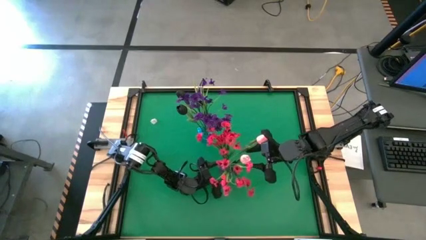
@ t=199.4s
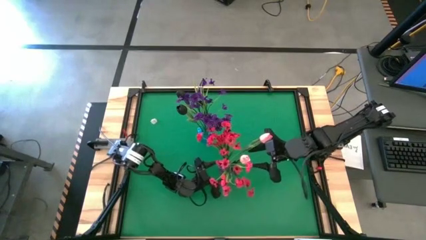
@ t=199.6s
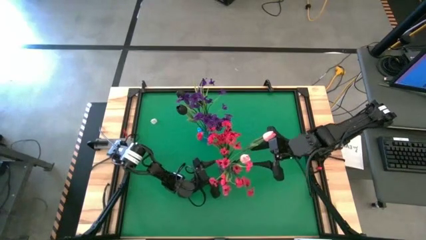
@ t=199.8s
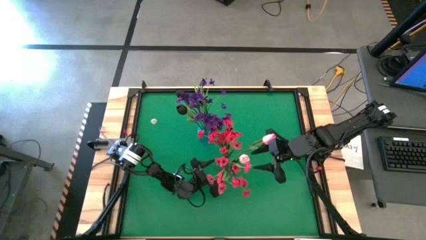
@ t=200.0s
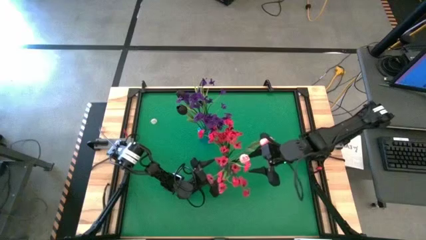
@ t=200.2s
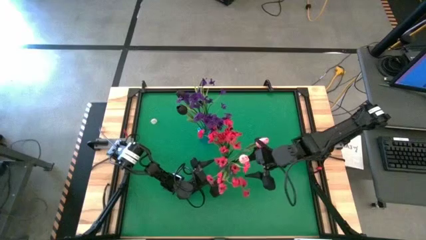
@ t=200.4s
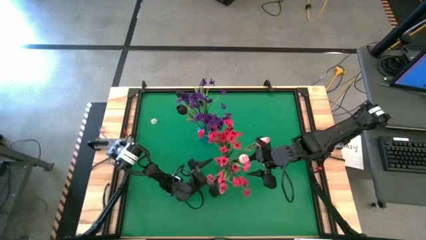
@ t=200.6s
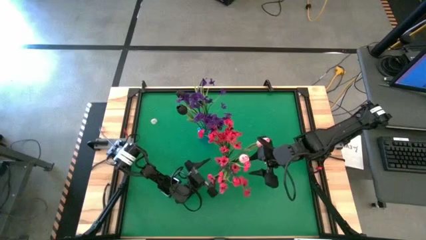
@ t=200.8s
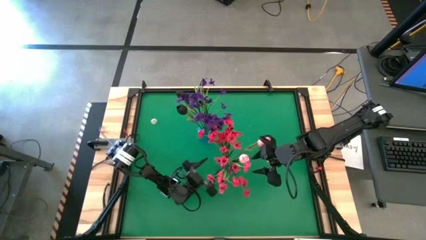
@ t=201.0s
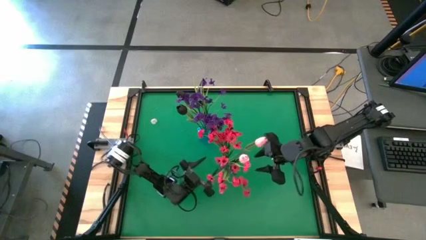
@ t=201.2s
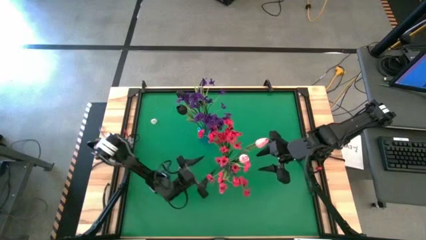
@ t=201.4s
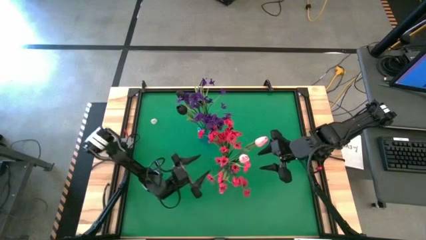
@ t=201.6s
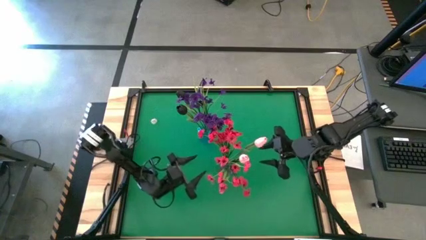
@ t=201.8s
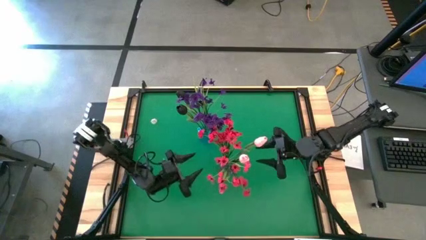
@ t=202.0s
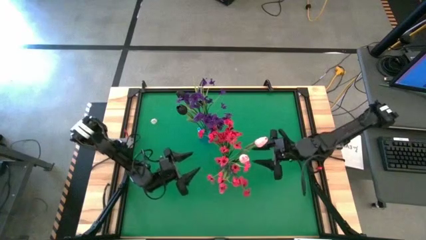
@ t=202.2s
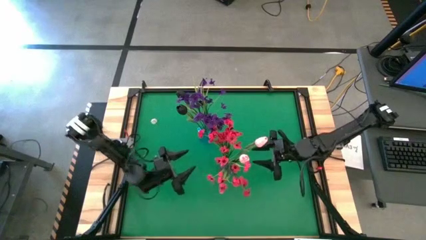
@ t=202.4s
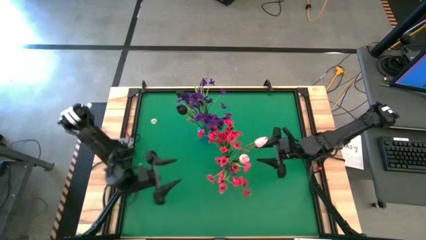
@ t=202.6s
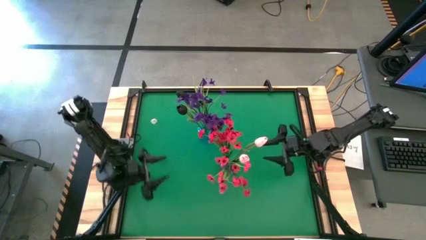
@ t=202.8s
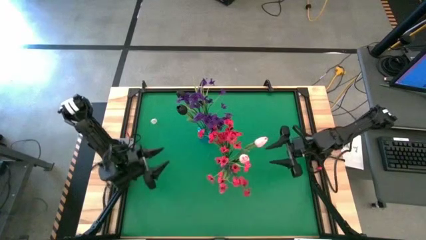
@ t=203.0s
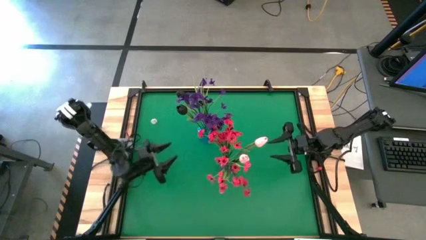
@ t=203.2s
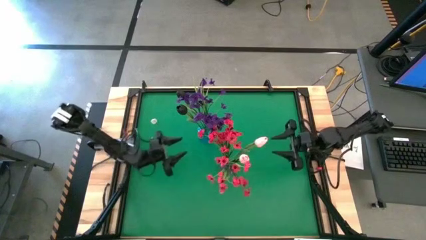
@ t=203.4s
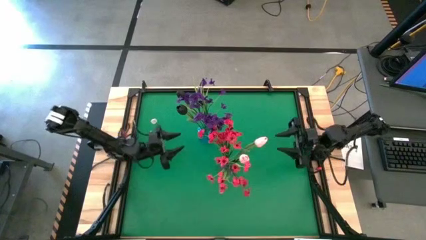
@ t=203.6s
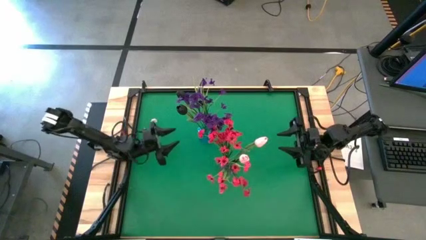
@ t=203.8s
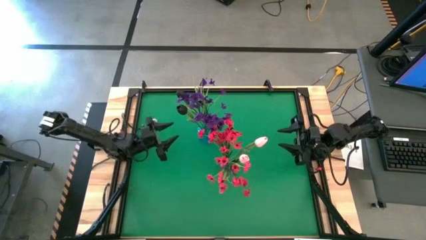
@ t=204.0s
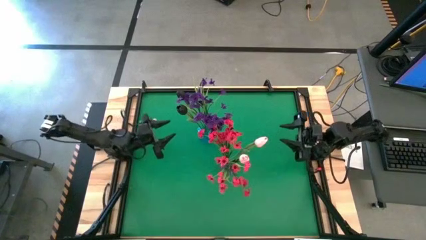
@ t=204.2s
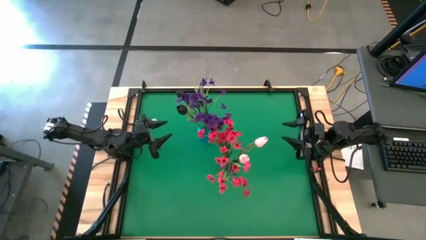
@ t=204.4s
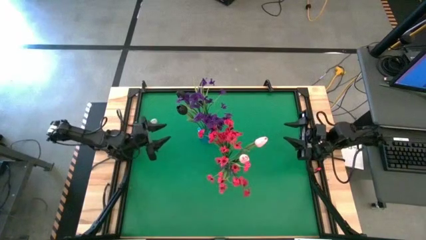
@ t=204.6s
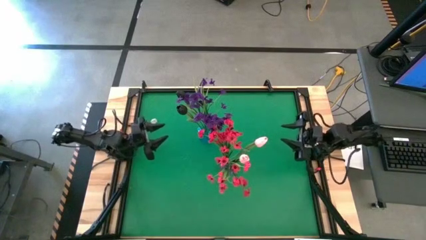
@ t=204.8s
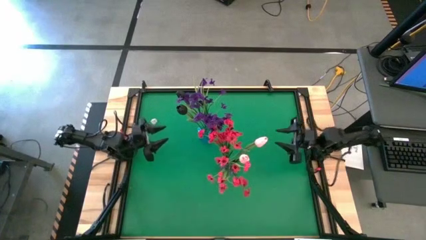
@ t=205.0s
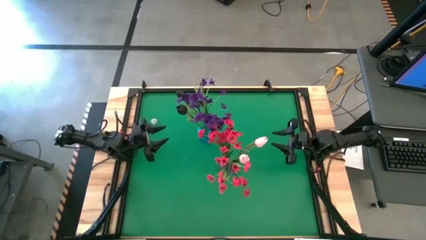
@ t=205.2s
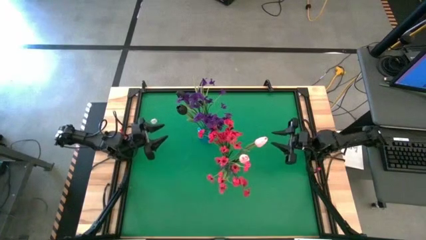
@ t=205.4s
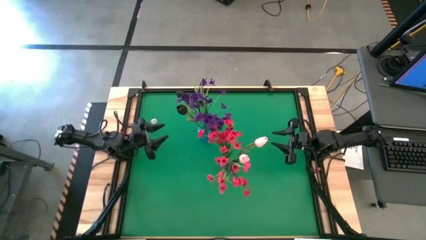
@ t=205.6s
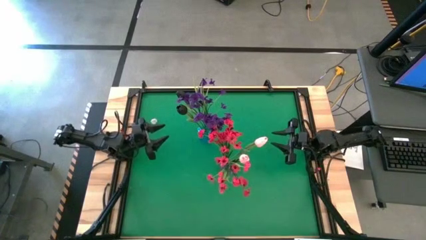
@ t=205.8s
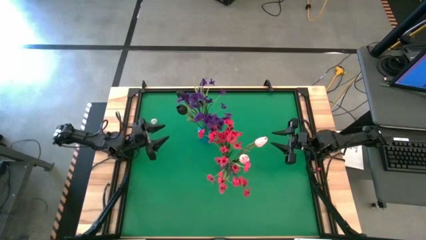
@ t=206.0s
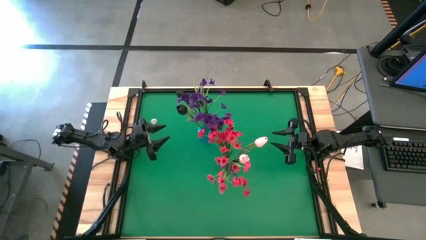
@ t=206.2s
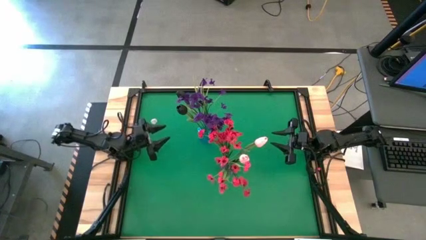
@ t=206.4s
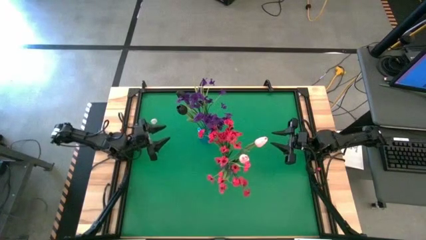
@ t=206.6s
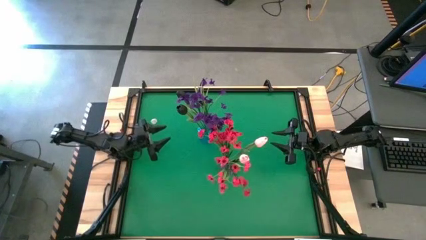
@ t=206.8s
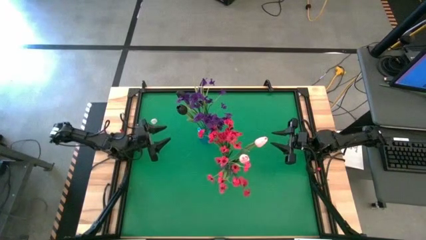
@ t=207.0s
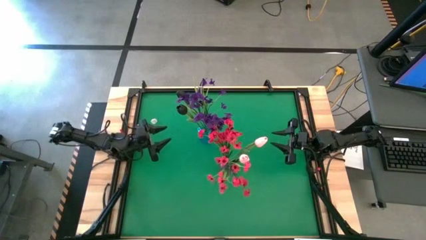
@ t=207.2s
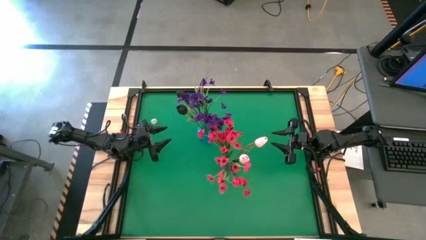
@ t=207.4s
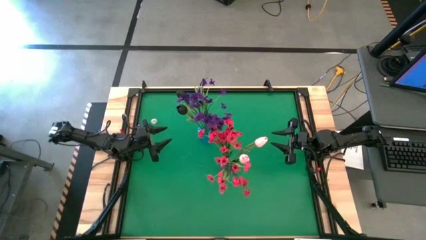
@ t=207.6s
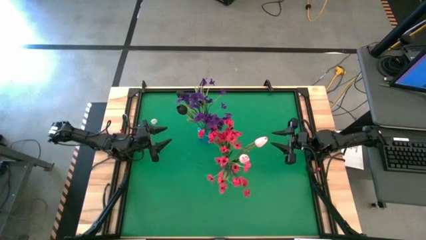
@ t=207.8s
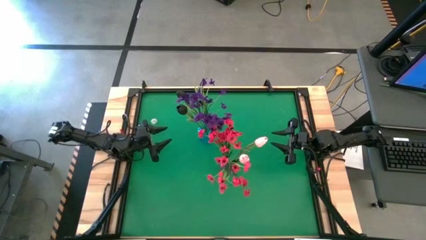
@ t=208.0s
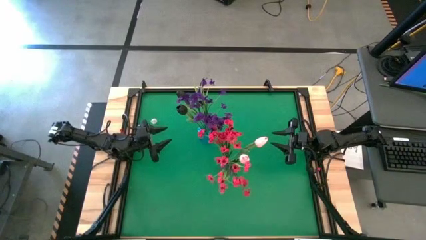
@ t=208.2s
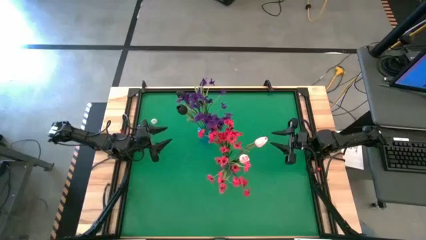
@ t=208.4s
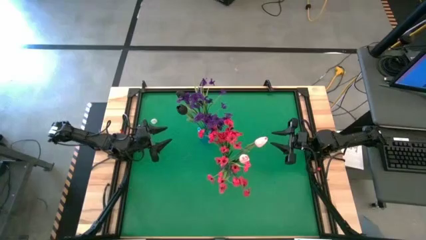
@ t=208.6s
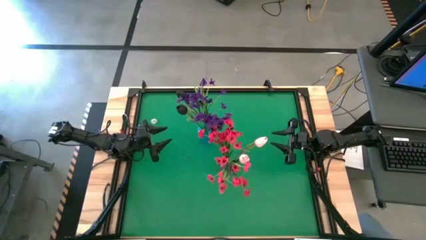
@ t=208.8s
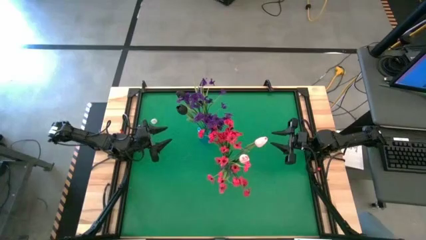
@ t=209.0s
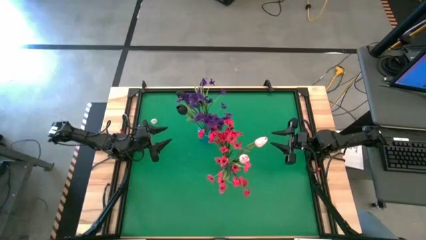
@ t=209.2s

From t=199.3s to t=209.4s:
Task: Sort flowers into vase by color
Return to Home Position

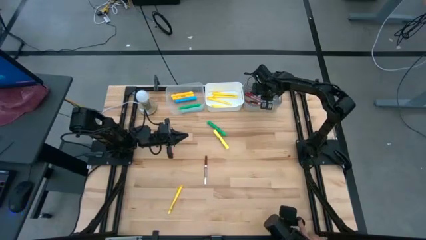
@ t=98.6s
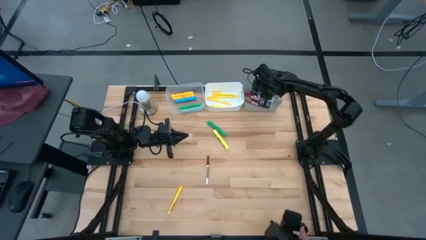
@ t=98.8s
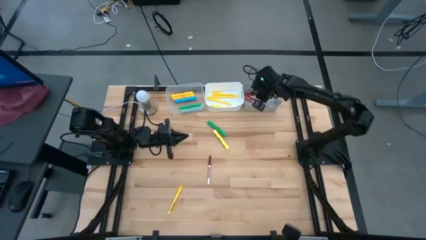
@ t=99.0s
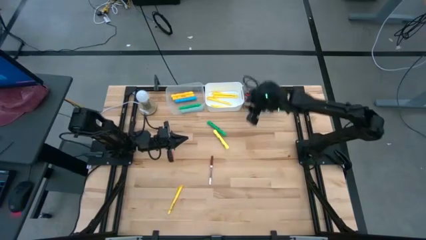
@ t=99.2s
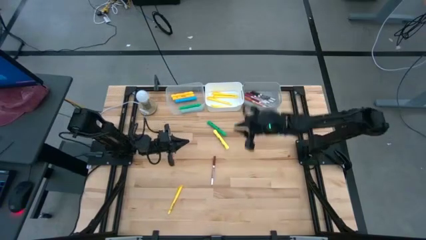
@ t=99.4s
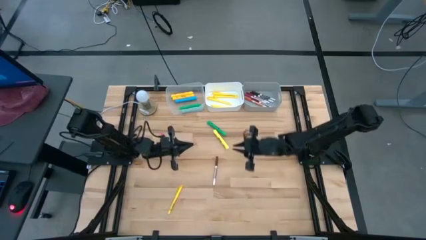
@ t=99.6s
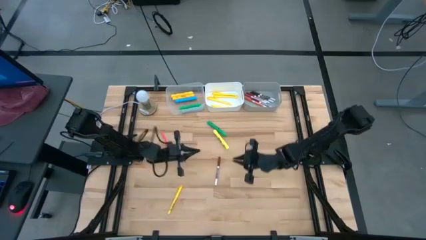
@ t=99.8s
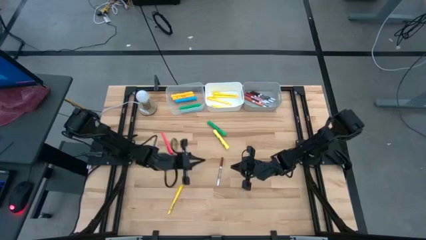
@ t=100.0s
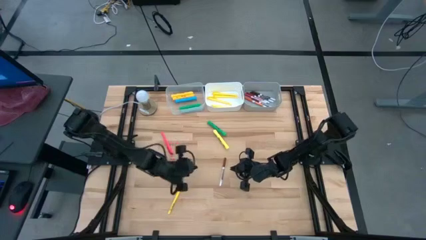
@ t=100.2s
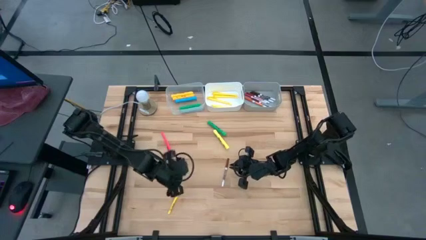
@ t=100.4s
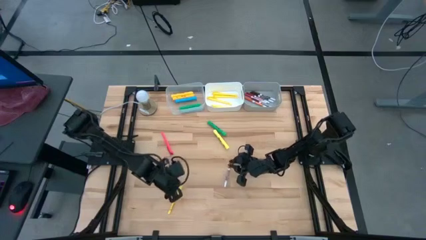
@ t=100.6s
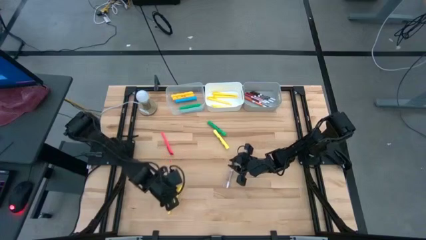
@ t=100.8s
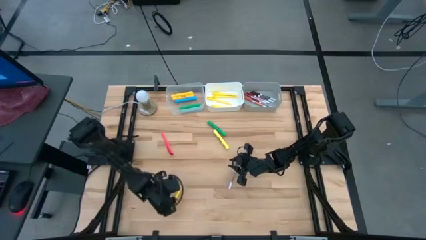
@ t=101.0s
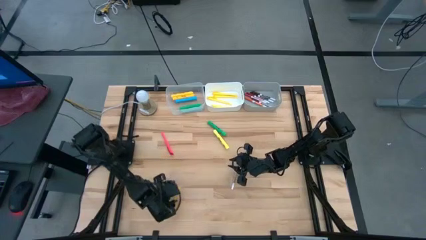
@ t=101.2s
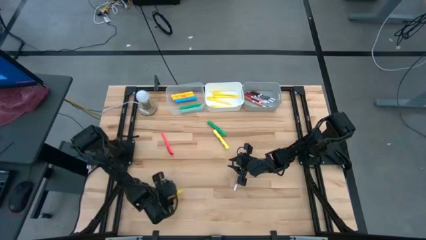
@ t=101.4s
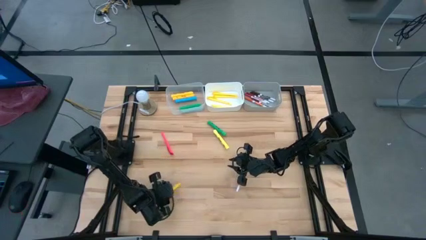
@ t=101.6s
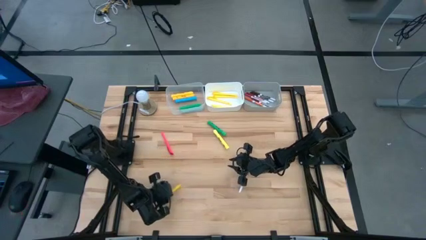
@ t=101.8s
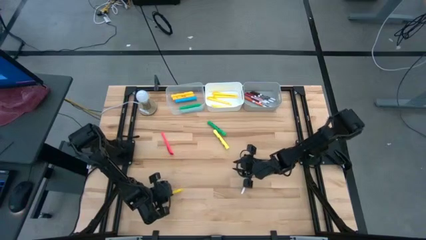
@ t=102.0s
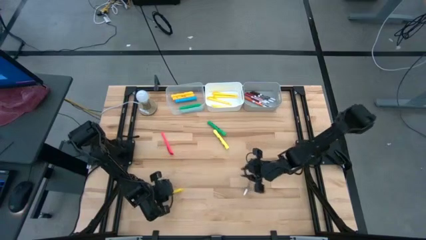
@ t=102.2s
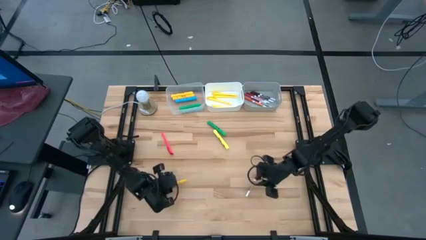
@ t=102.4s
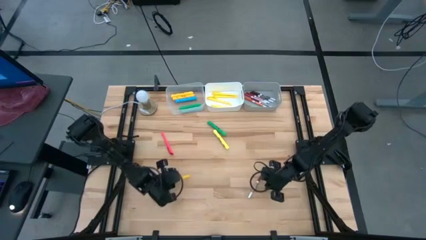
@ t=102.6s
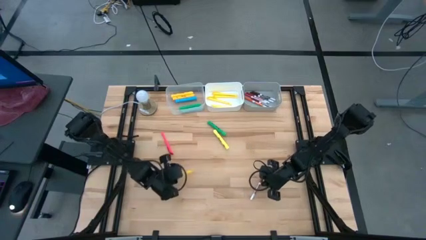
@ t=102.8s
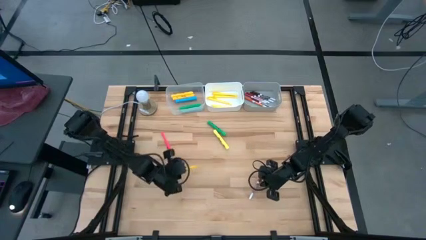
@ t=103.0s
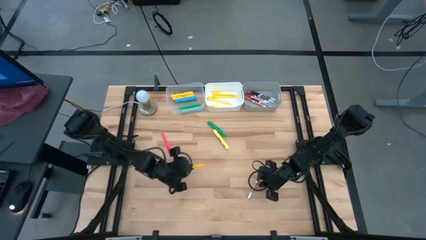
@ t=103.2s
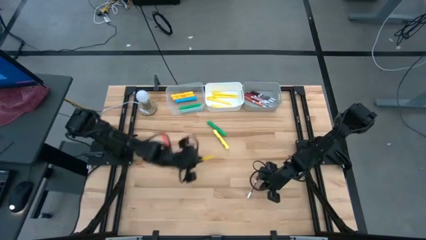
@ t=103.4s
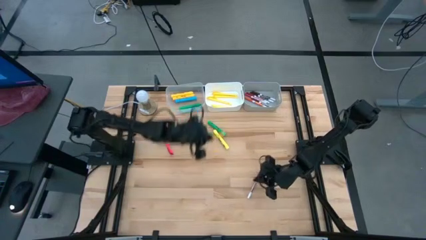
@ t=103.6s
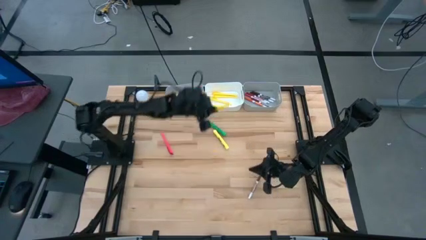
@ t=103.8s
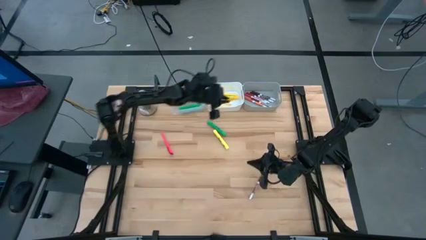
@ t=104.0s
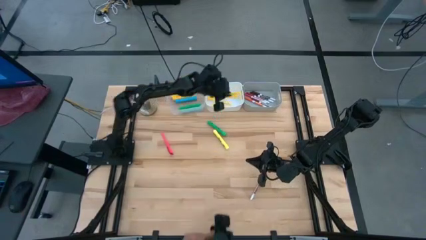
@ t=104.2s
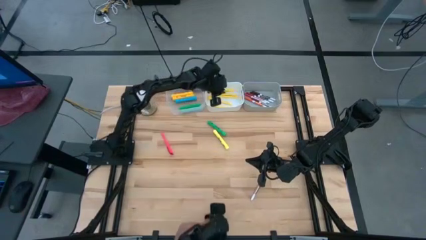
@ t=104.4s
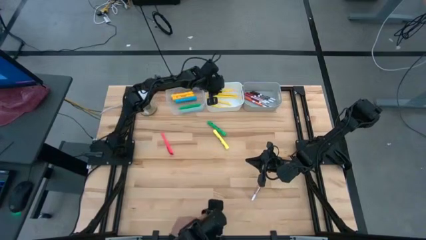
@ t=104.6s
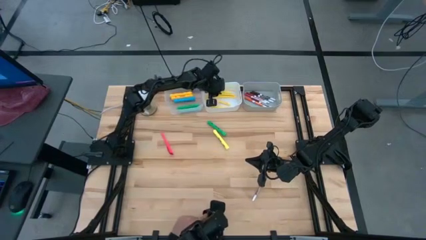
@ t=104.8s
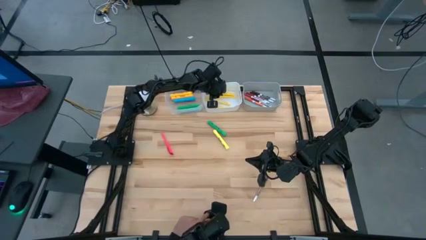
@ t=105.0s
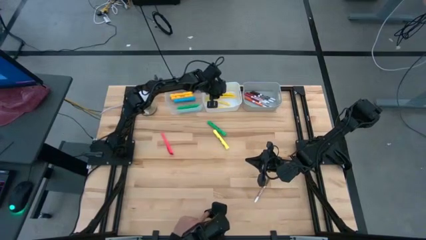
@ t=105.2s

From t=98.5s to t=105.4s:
Task: Pick & Place Markers
Put the yellow pen into the white bin
